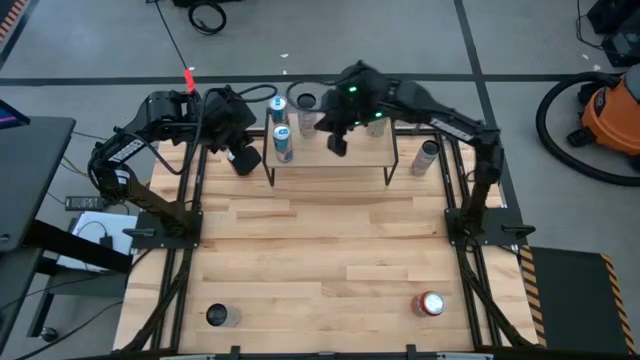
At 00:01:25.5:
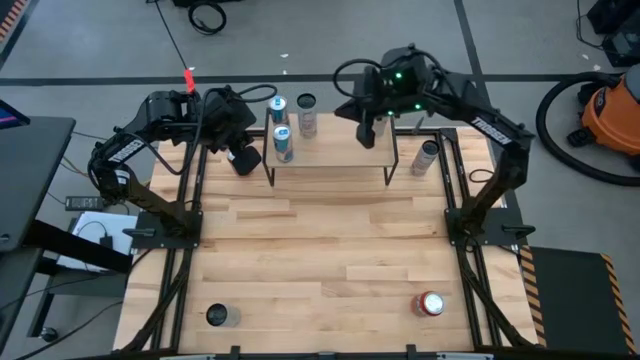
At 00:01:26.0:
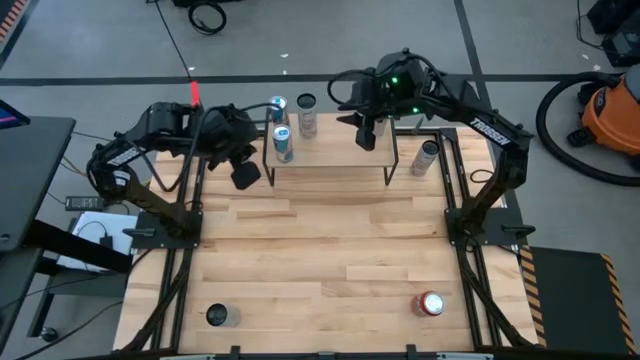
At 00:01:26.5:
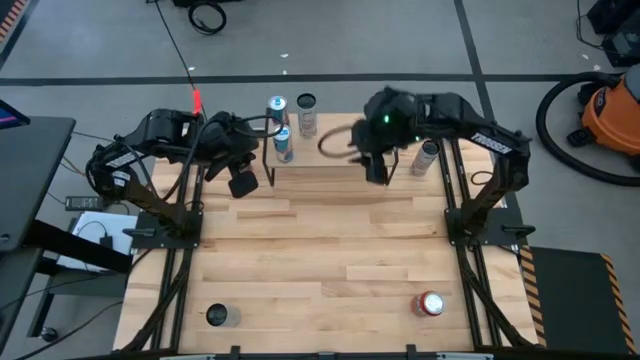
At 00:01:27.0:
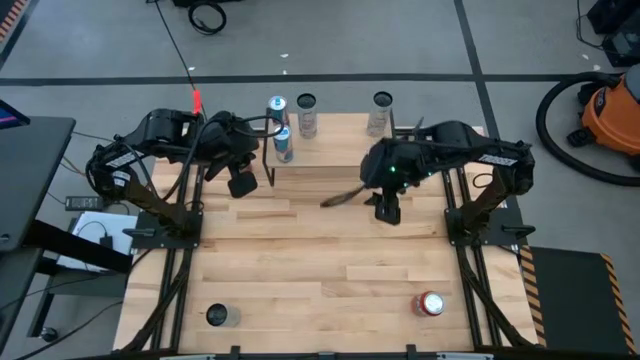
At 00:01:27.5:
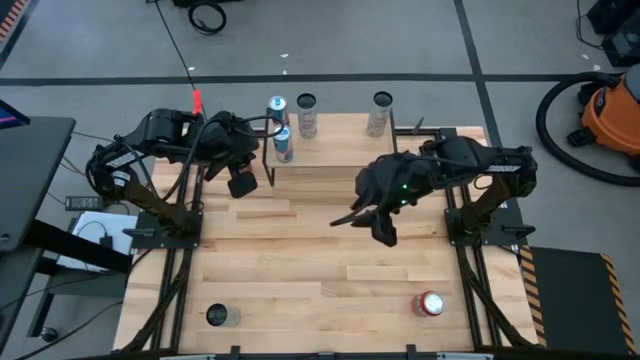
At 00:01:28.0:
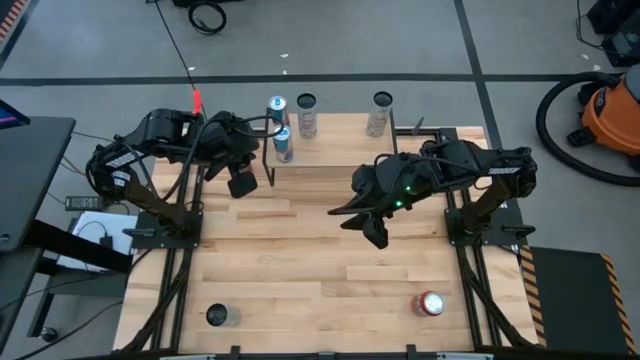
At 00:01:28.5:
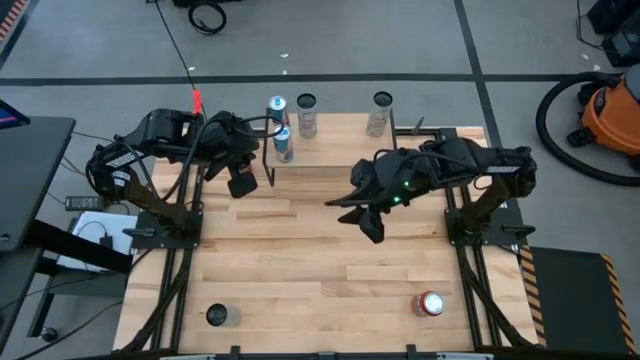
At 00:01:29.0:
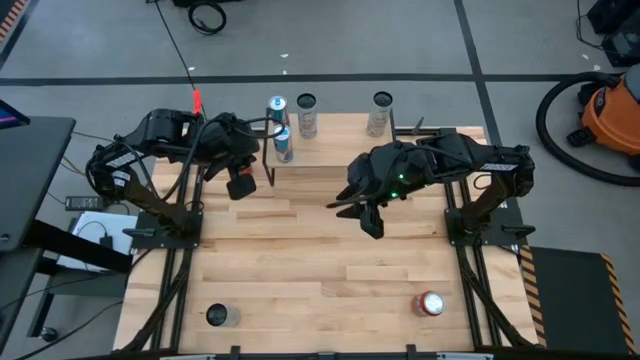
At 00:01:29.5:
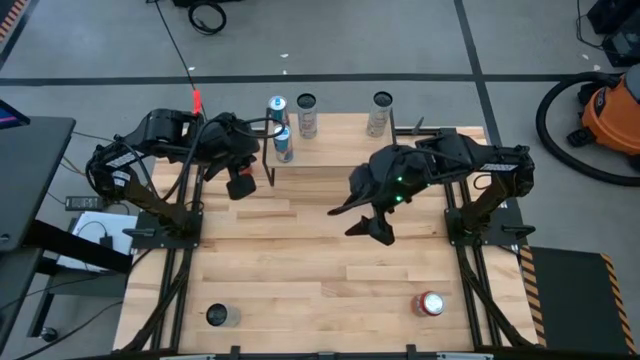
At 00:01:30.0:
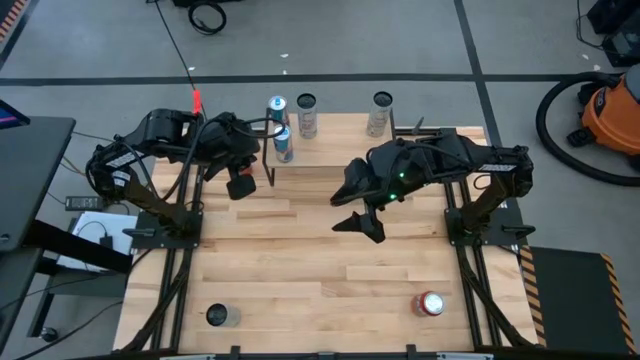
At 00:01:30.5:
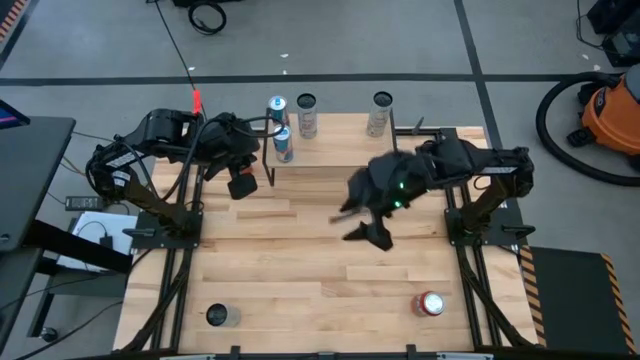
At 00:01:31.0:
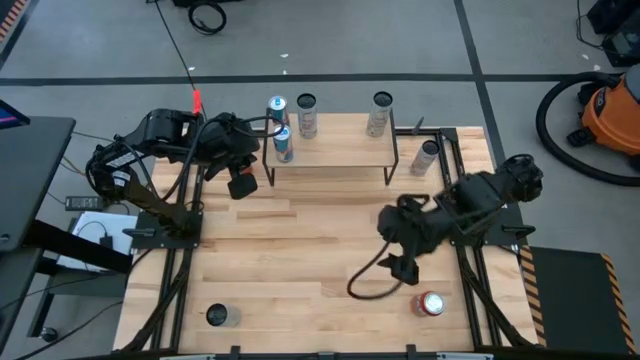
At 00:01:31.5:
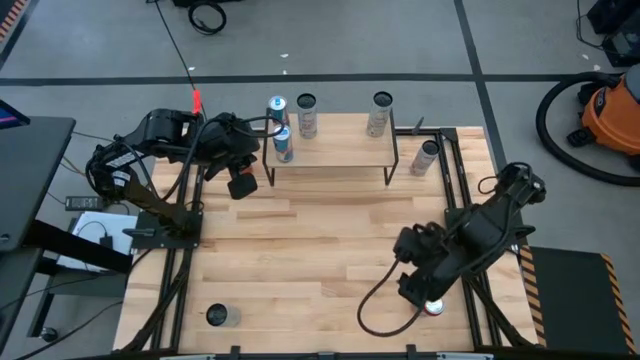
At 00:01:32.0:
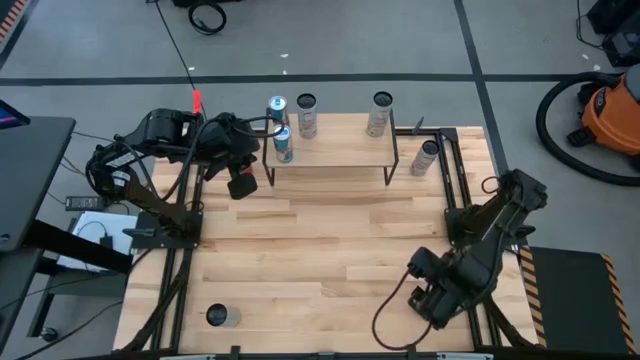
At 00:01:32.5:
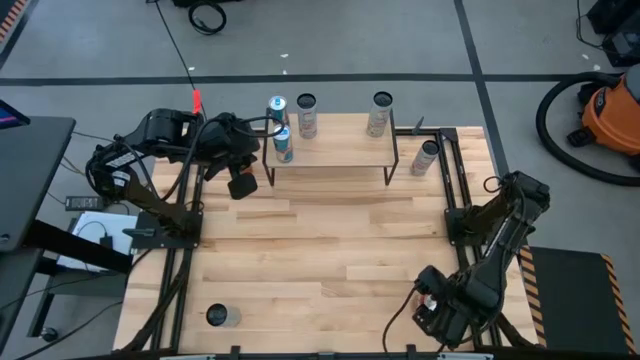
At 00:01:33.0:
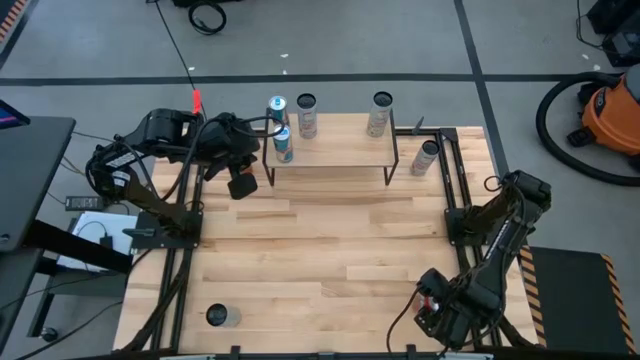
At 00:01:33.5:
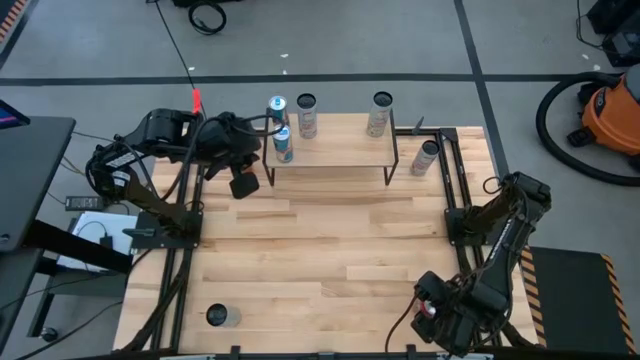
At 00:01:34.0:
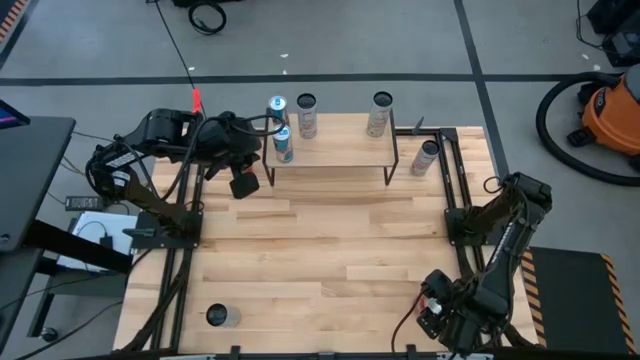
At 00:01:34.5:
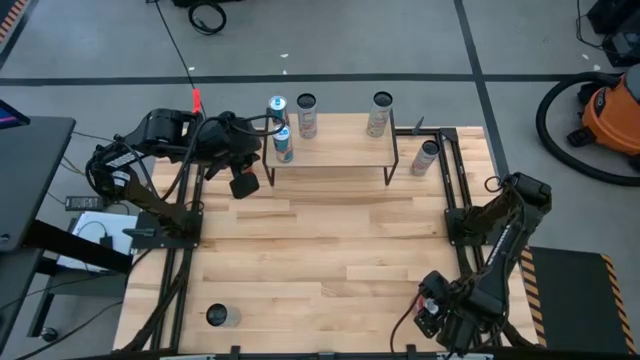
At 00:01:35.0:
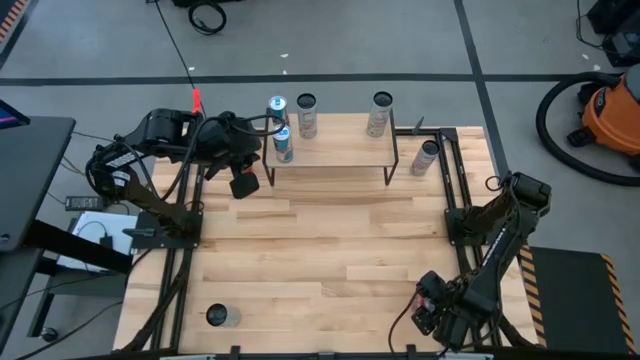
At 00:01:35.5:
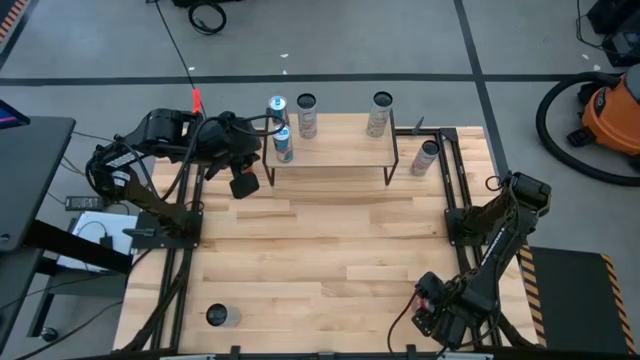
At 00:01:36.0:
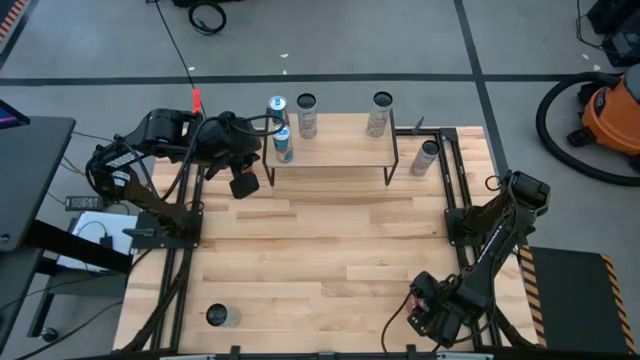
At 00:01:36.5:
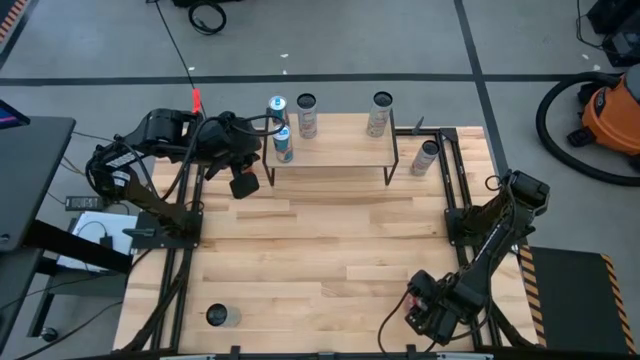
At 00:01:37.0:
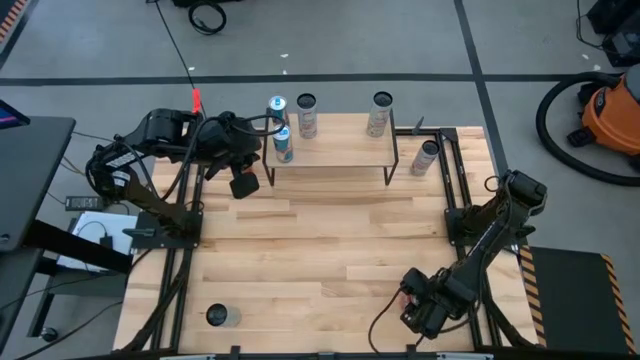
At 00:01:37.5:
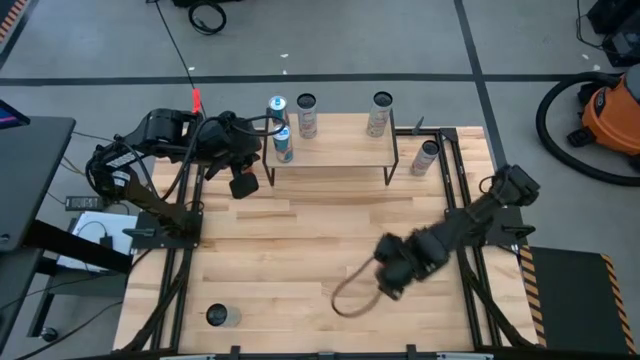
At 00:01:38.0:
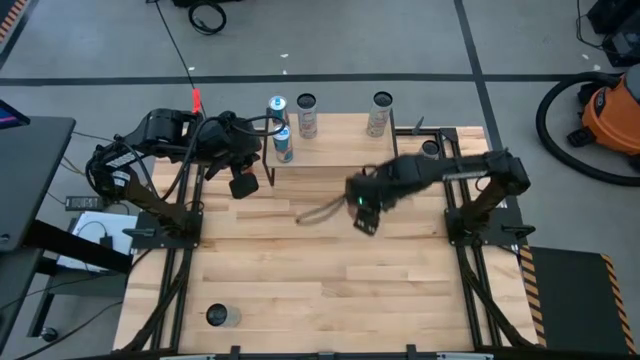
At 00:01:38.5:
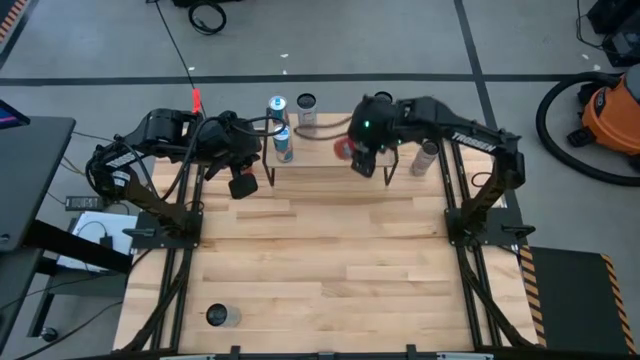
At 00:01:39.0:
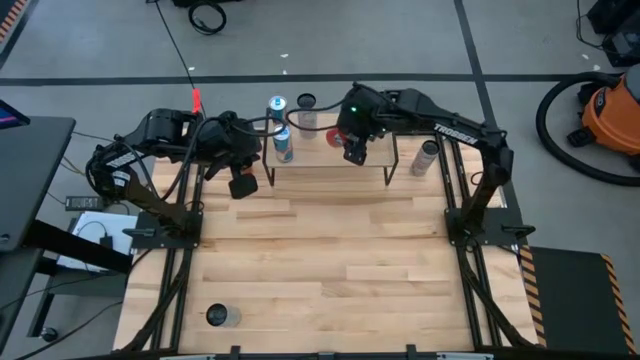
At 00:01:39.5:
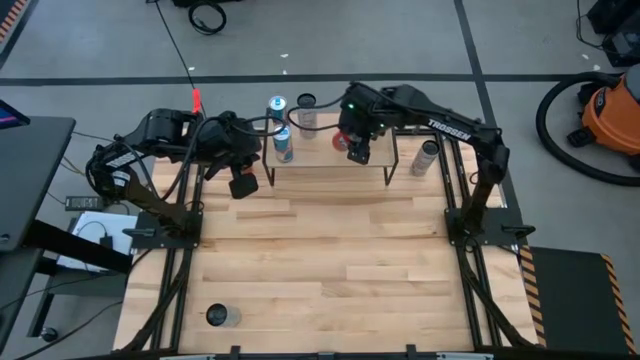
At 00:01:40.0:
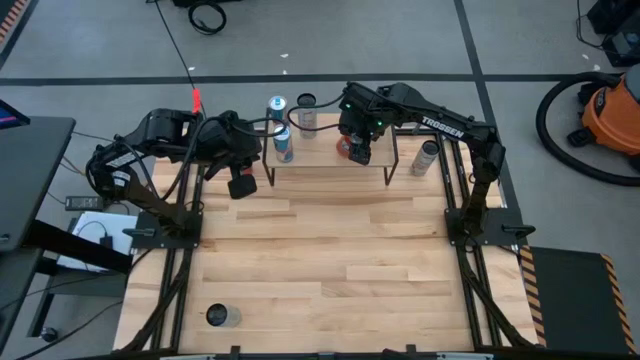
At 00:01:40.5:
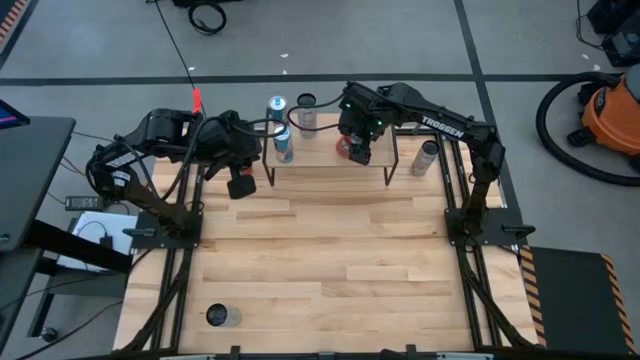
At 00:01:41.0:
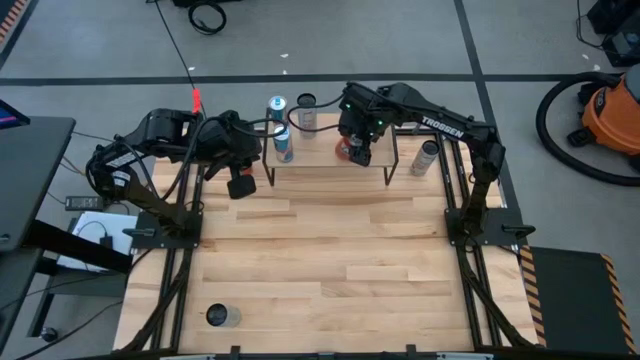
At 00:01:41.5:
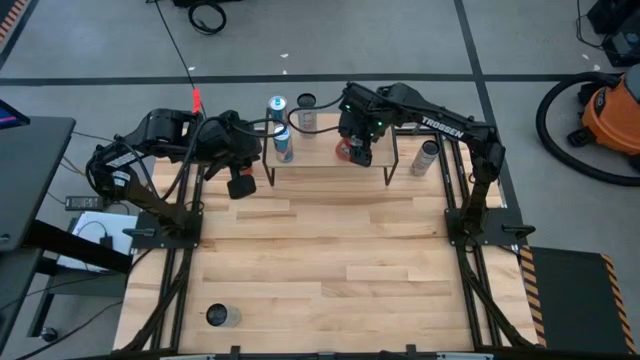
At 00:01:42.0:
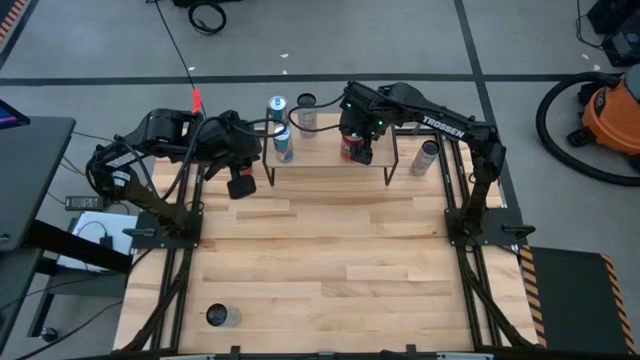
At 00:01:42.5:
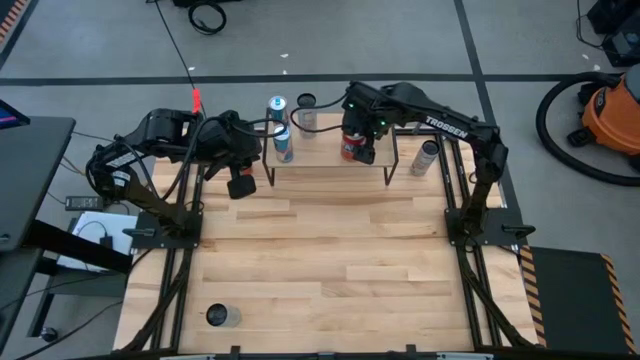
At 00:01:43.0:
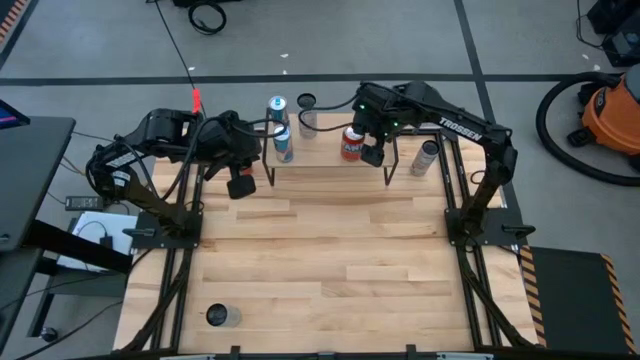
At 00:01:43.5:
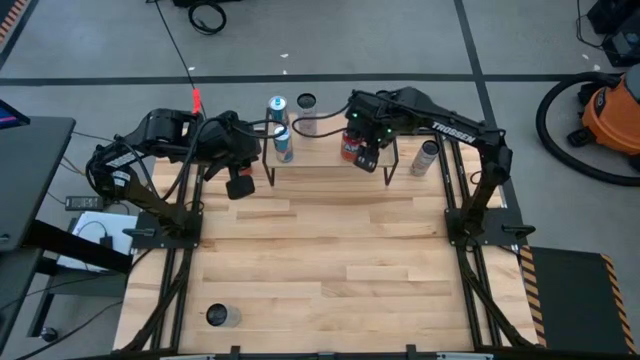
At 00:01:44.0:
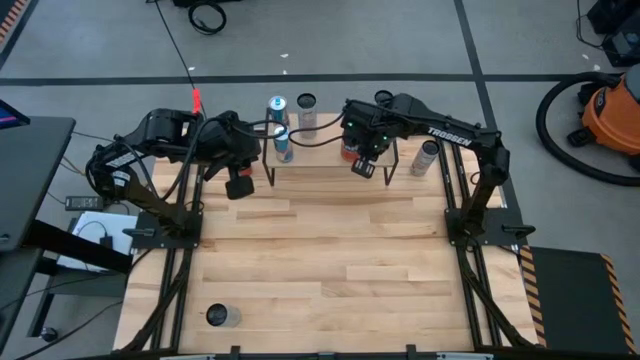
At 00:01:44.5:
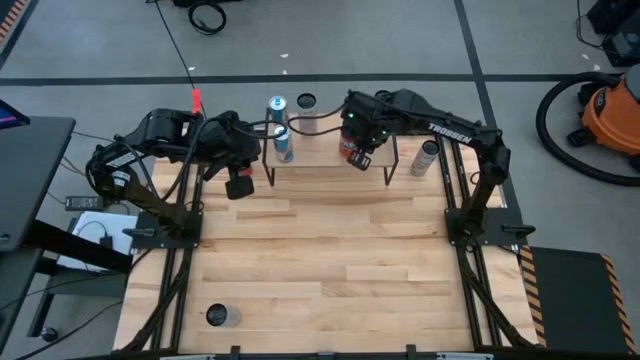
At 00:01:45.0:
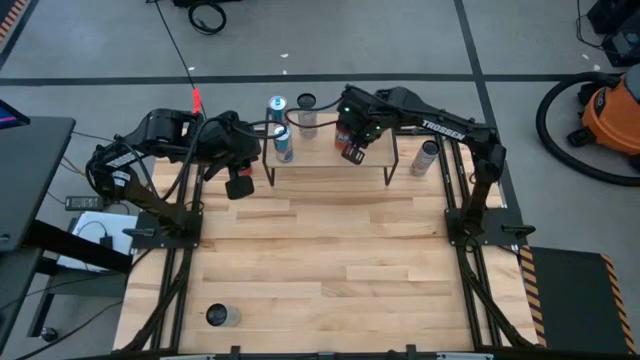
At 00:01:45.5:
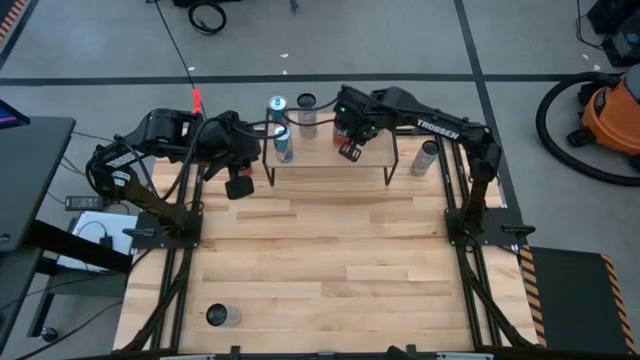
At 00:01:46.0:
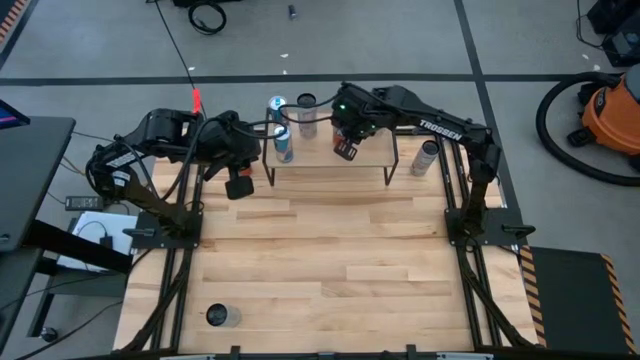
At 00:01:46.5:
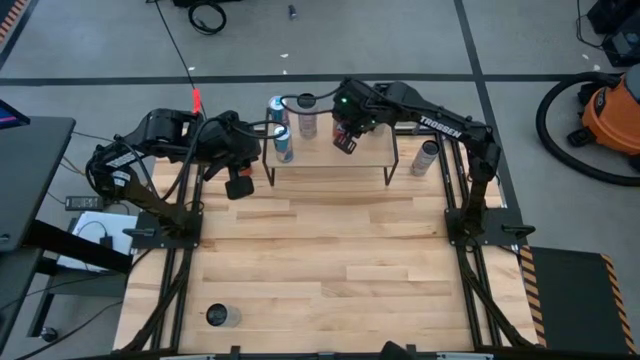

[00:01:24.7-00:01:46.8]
Task: Place canned beverage on shelf
Put the bottom orange soda can on the shelf
